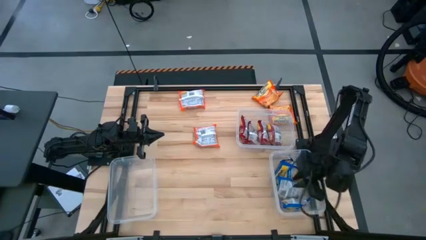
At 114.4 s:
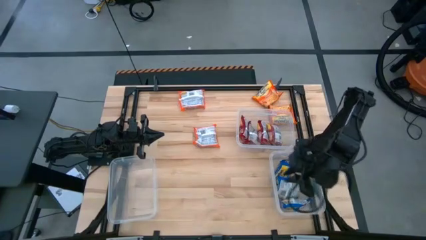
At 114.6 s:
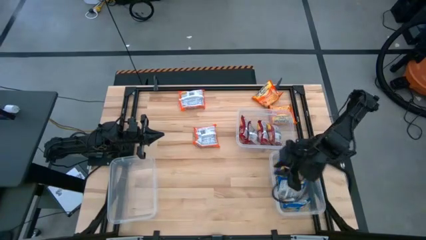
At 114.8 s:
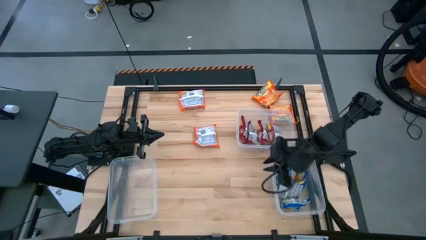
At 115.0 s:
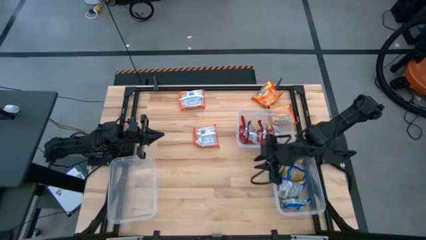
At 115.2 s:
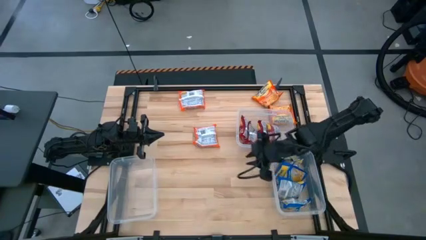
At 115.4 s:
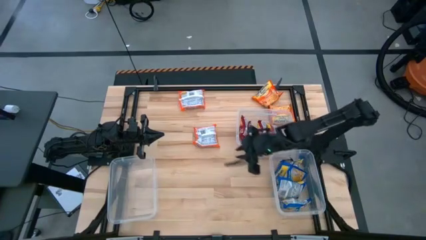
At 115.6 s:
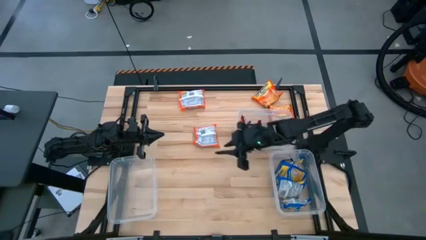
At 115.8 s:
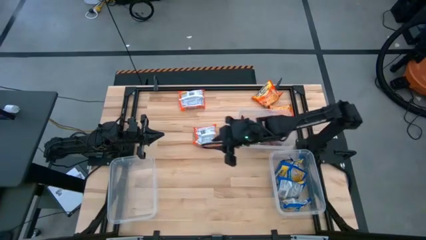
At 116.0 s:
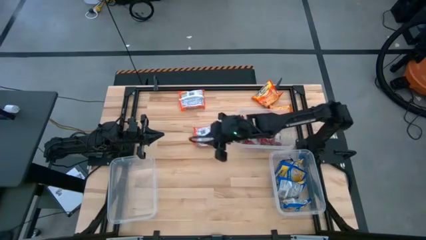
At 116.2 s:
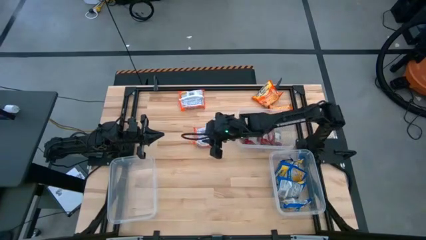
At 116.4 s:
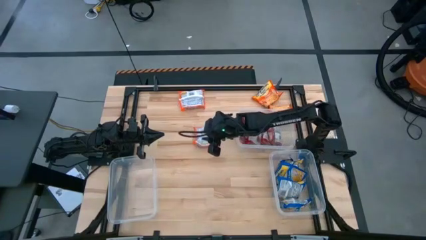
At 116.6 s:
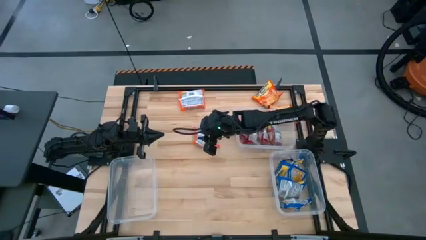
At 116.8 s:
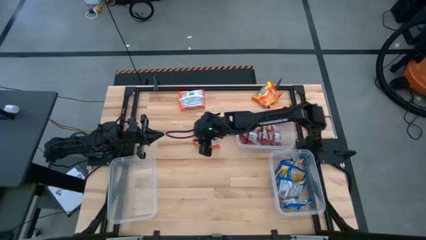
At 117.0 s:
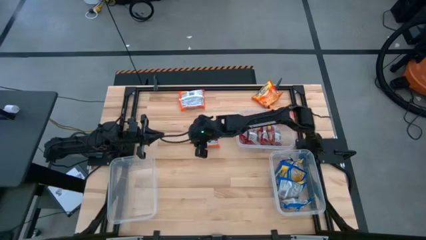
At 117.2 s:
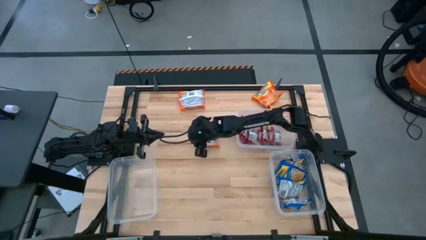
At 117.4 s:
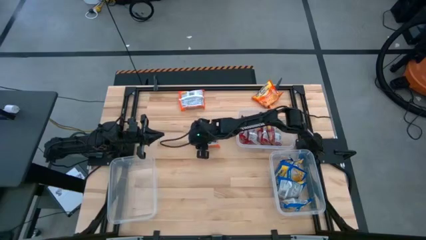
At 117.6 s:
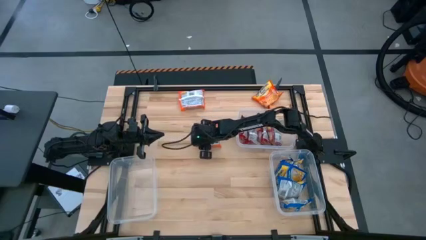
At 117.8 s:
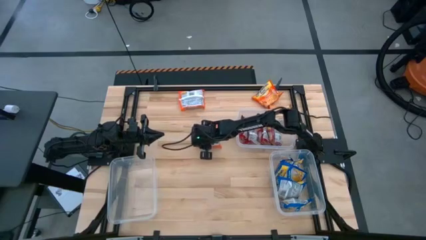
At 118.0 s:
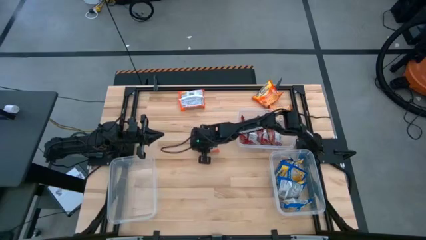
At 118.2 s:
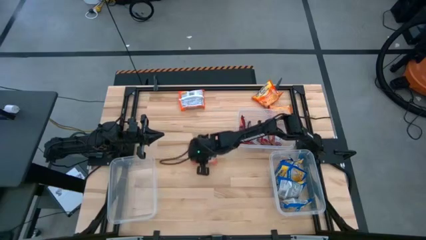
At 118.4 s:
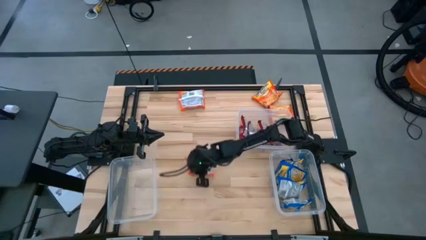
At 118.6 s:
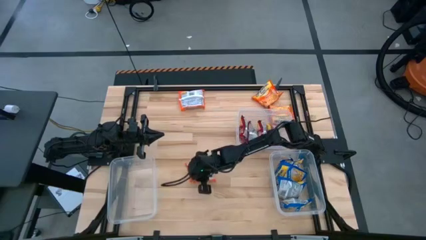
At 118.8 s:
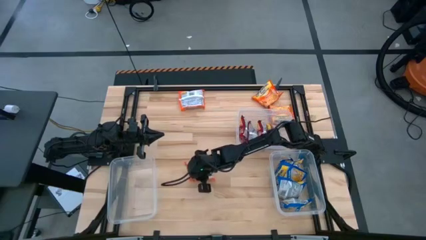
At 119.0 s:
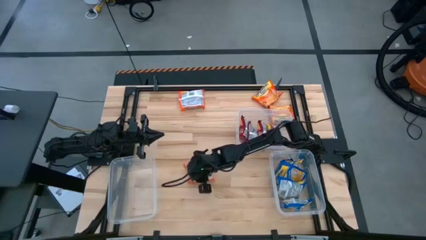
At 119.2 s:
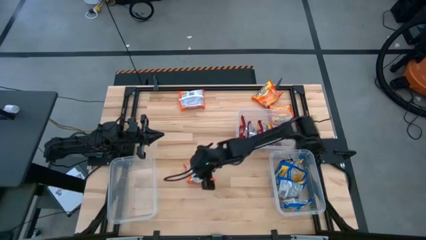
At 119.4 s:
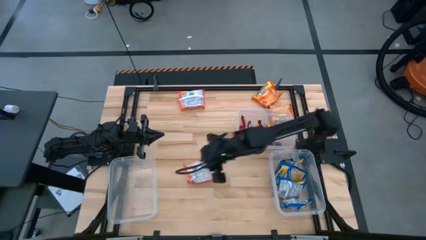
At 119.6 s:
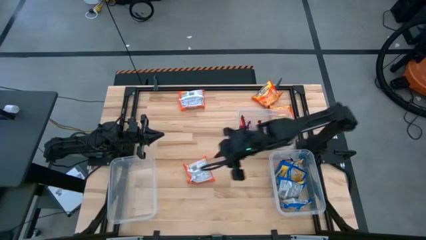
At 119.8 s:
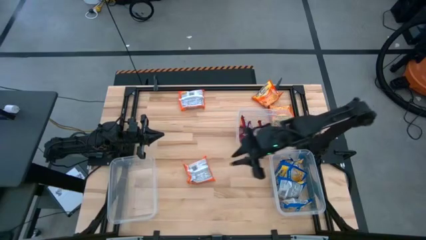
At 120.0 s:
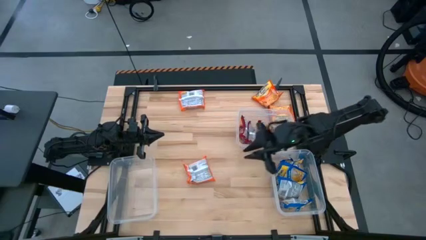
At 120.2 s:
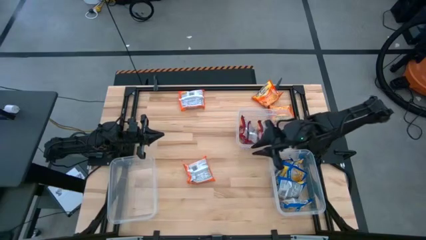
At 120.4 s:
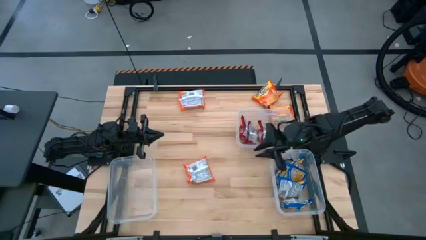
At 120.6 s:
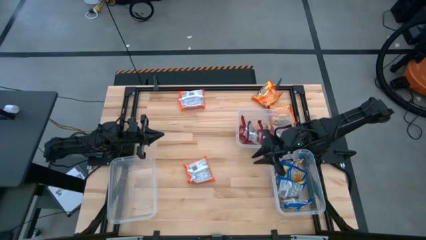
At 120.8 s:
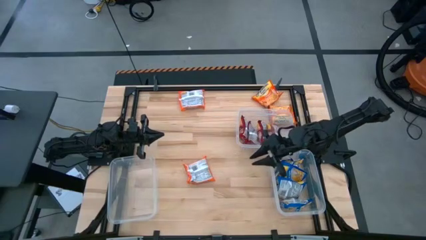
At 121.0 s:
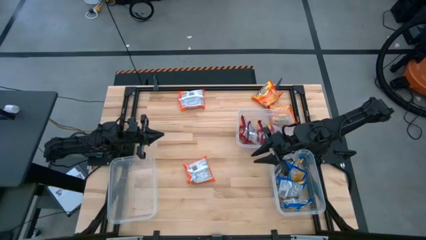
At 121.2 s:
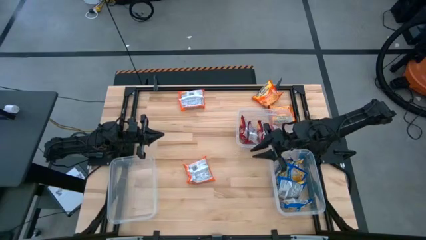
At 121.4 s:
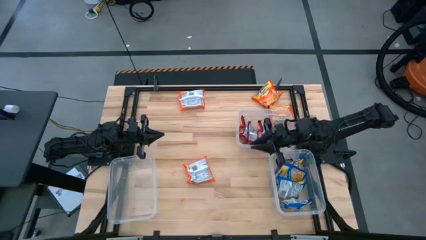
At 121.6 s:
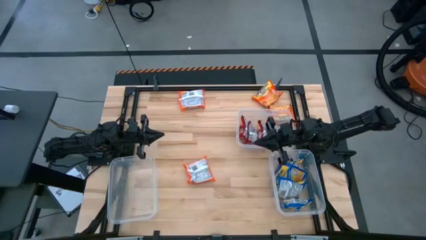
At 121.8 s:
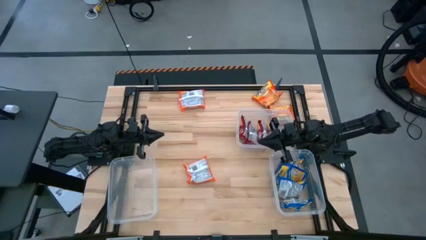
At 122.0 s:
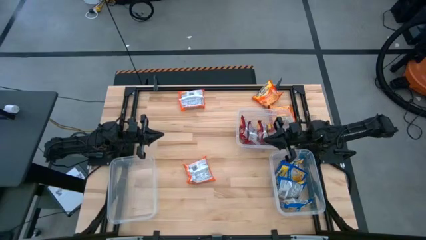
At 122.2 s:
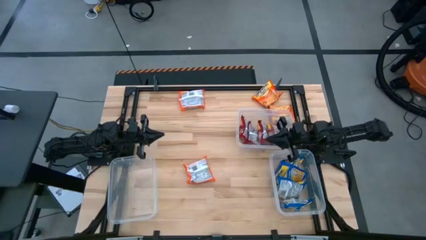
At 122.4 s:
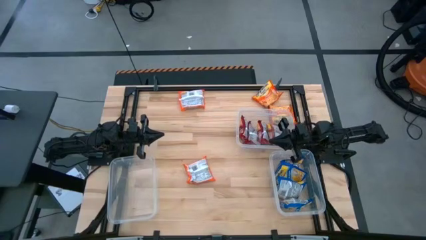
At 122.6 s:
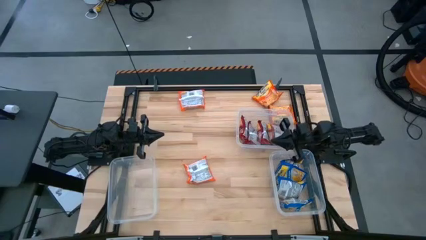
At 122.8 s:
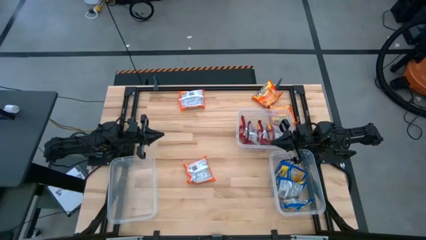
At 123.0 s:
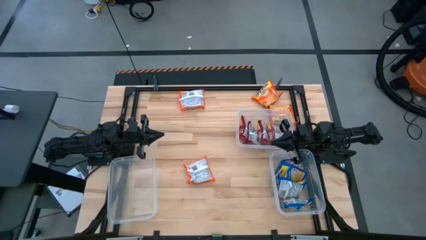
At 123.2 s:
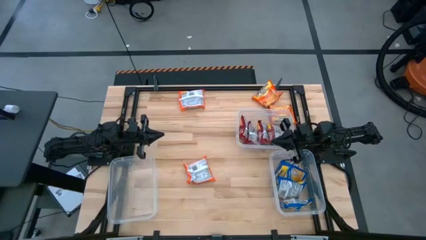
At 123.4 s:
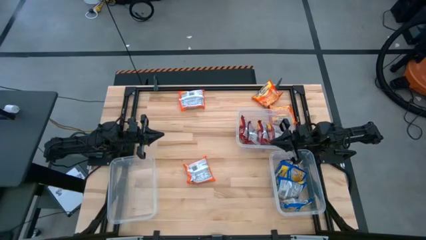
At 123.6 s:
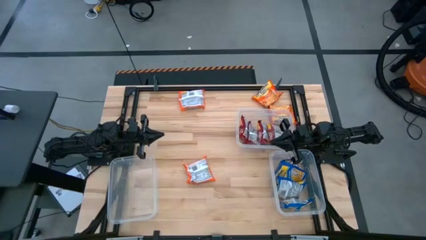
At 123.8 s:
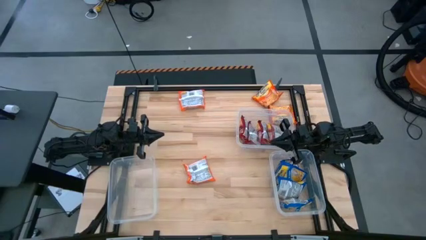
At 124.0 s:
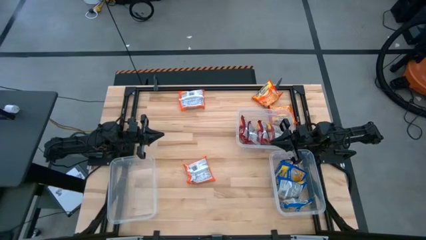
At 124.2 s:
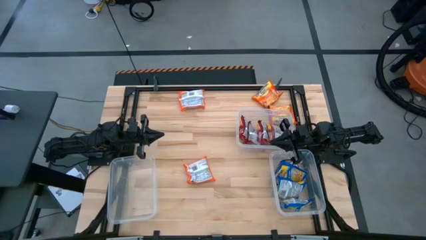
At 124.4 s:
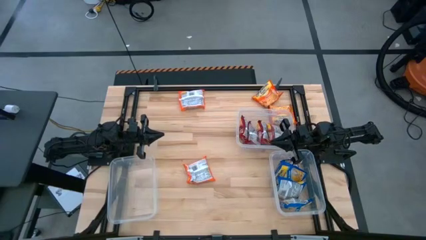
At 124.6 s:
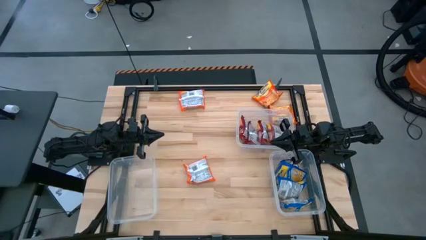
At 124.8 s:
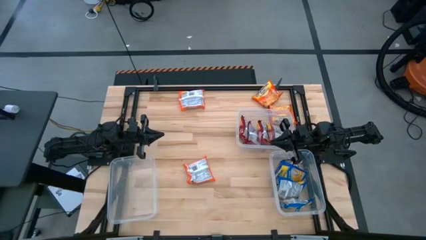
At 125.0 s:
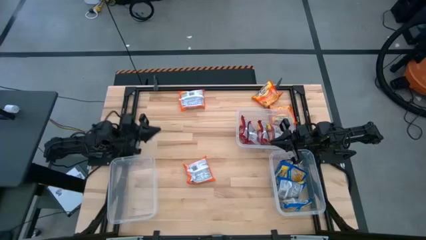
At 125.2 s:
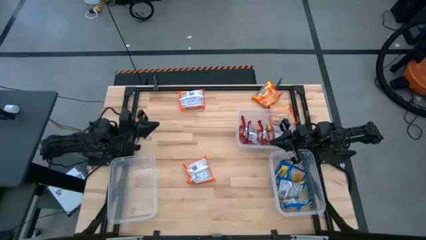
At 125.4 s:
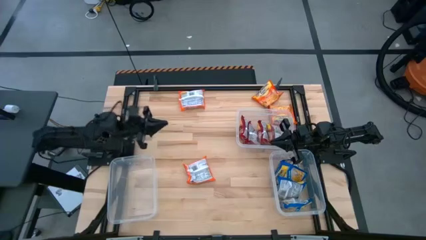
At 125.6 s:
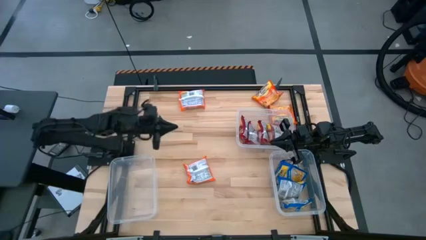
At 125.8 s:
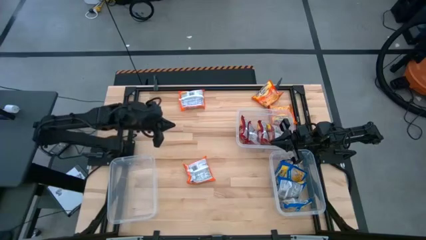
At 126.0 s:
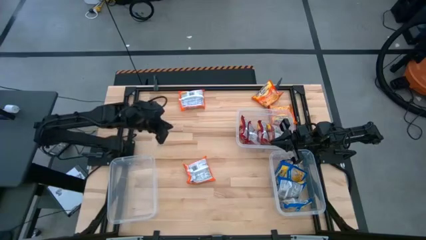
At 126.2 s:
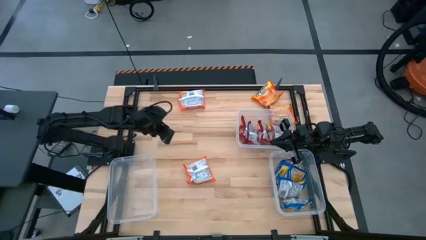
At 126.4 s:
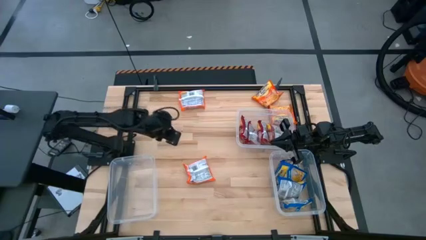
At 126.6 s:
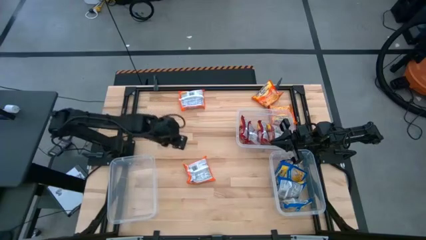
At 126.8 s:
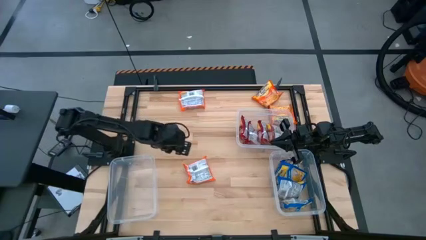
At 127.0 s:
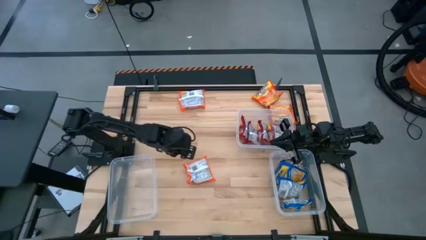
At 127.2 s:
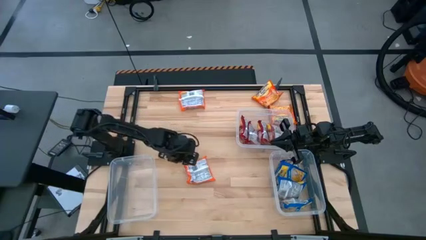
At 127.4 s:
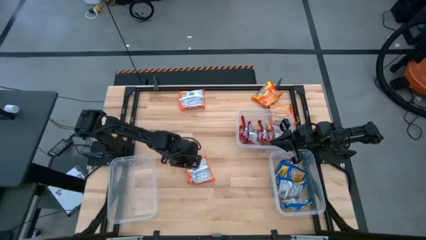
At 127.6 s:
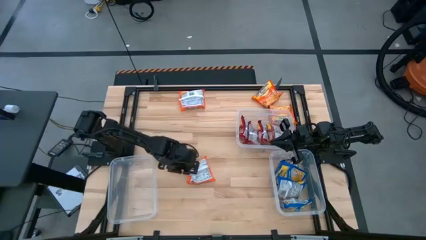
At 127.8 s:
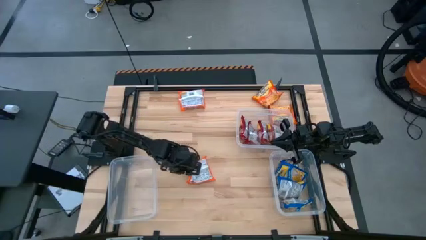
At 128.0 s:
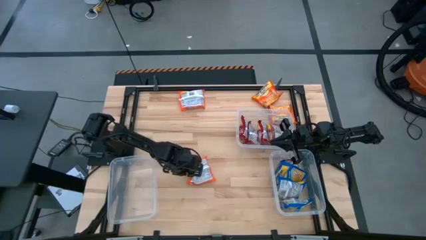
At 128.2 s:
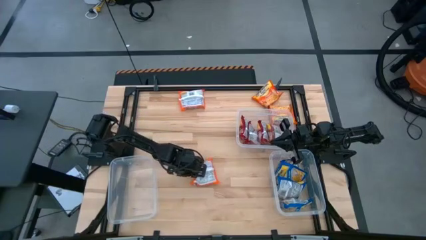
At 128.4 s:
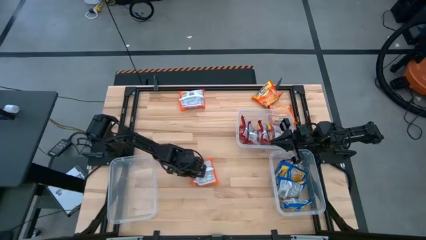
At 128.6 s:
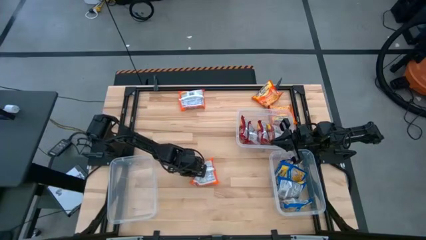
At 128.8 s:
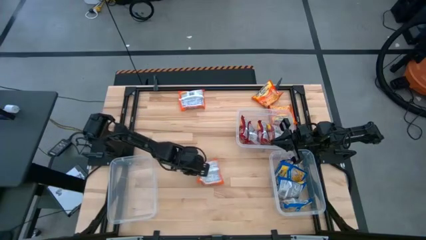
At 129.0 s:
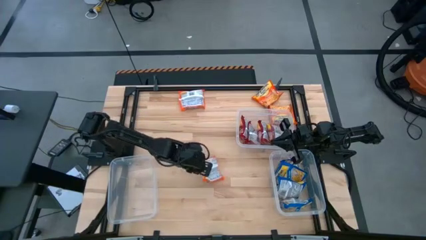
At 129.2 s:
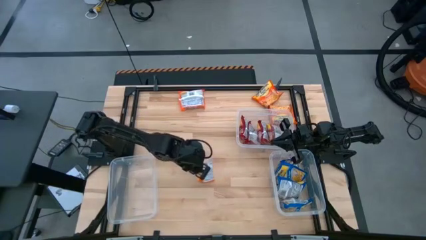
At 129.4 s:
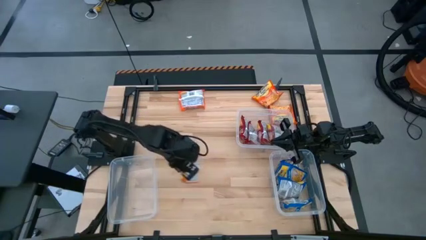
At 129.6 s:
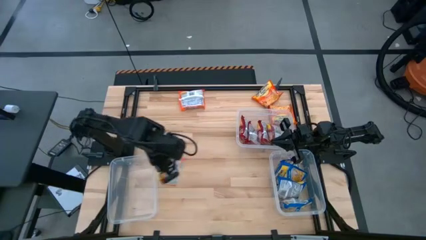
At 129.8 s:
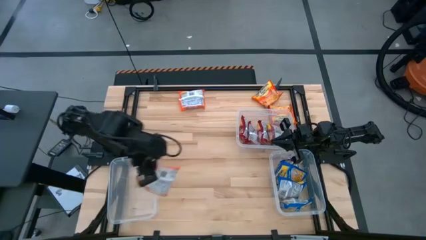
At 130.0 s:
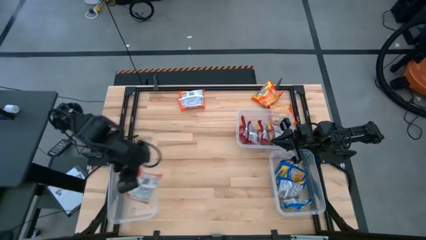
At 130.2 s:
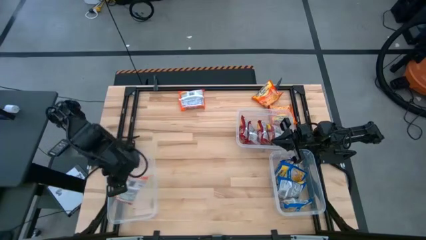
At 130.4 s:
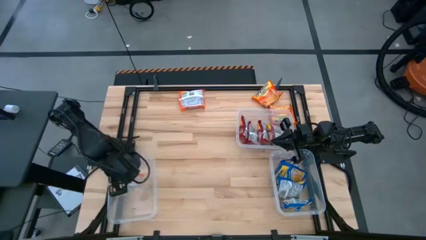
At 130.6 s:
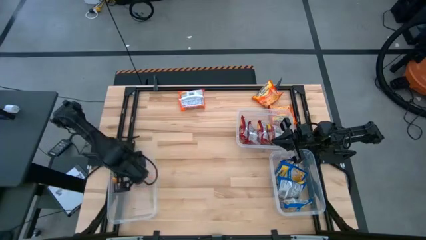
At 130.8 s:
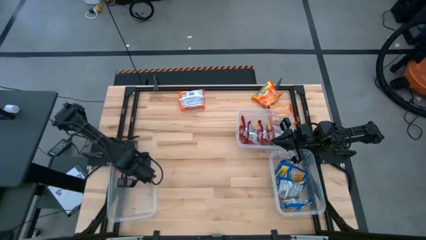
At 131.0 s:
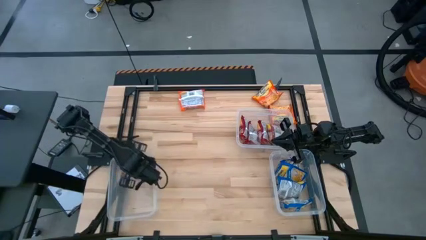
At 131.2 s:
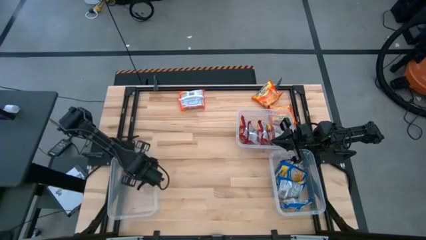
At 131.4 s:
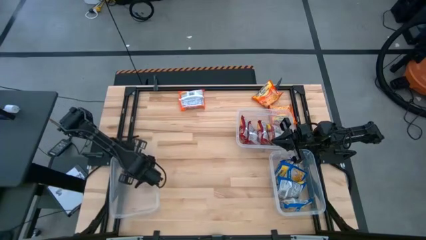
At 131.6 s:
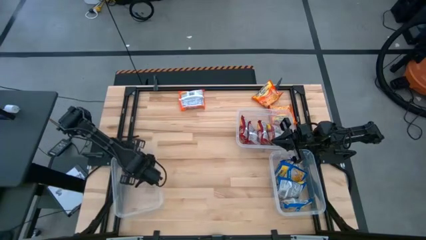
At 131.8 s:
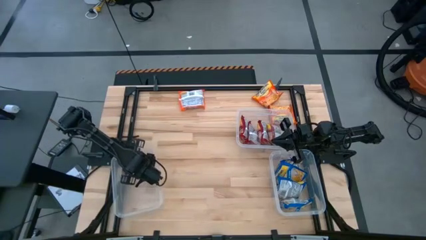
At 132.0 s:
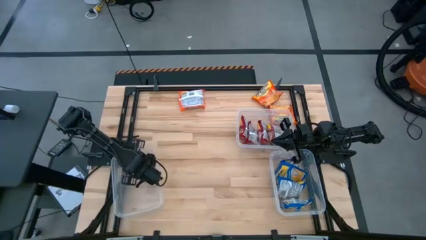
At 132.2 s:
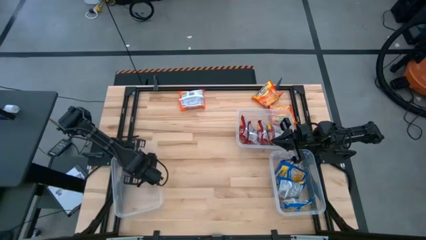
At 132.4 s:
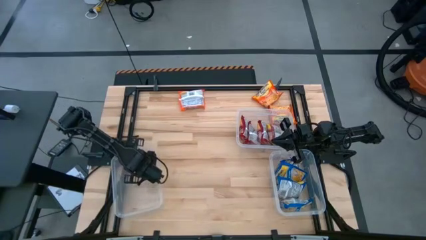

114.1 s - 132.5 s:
Task: Sort Maruchan noodles
Put the orange noodle pack into the left container
